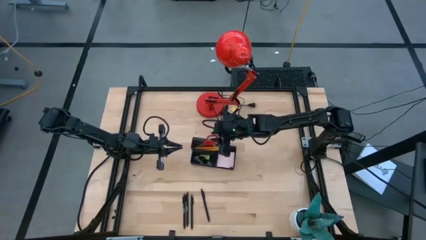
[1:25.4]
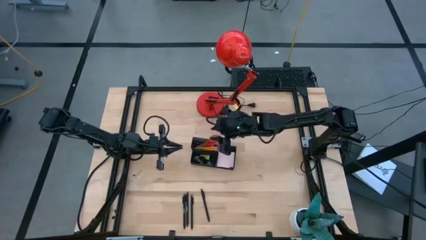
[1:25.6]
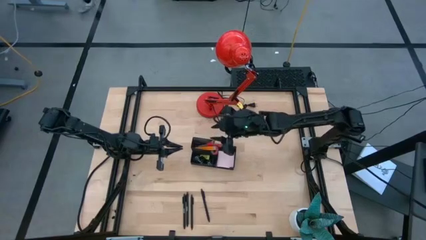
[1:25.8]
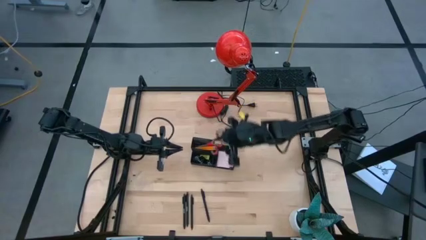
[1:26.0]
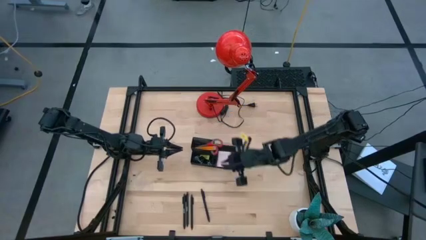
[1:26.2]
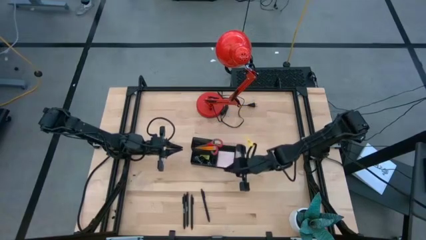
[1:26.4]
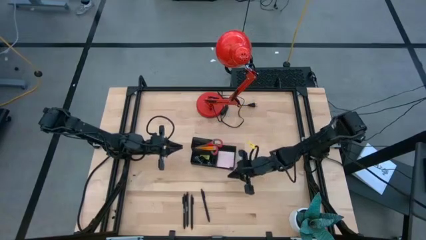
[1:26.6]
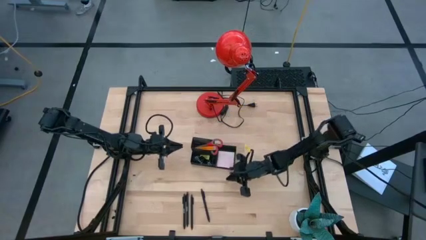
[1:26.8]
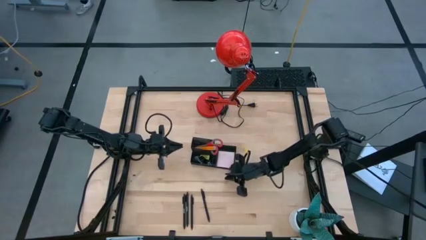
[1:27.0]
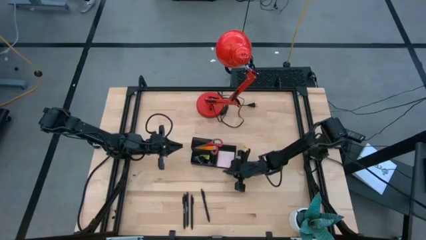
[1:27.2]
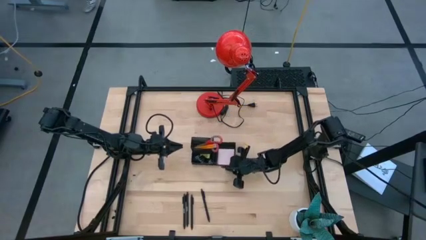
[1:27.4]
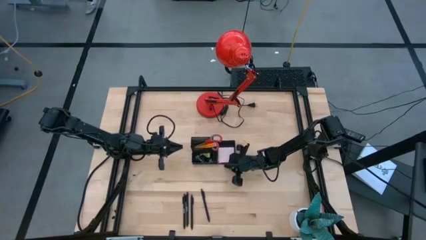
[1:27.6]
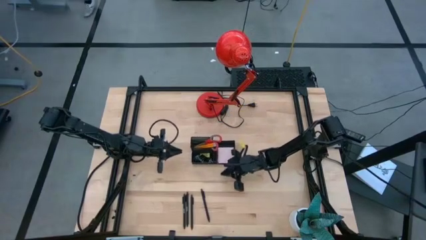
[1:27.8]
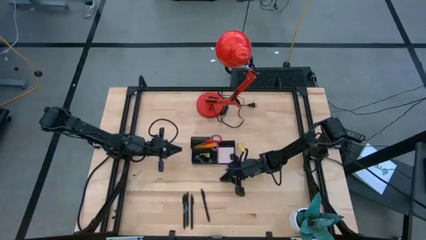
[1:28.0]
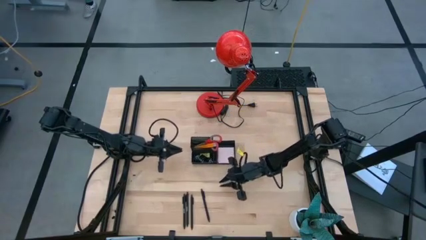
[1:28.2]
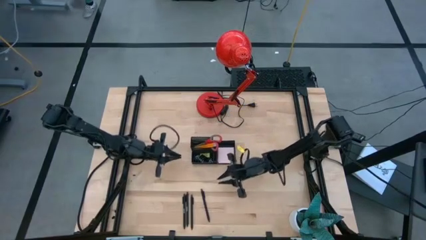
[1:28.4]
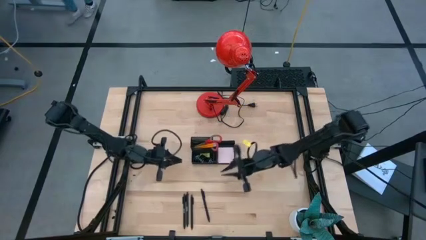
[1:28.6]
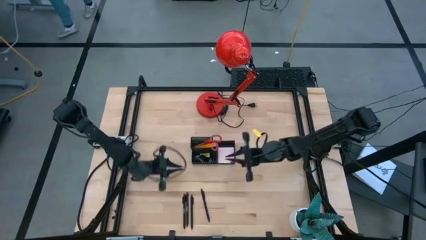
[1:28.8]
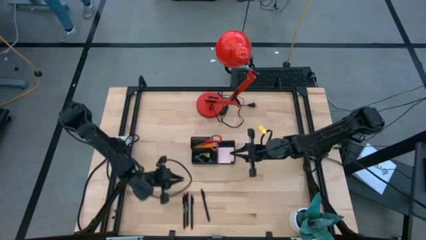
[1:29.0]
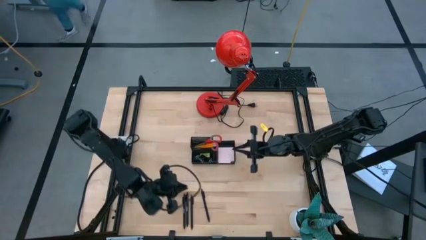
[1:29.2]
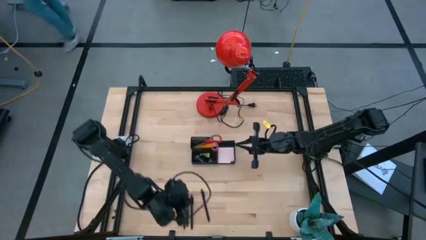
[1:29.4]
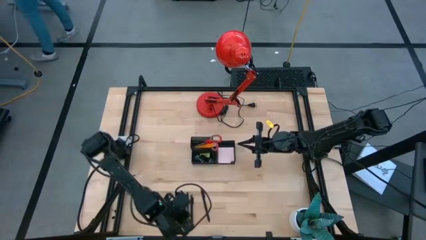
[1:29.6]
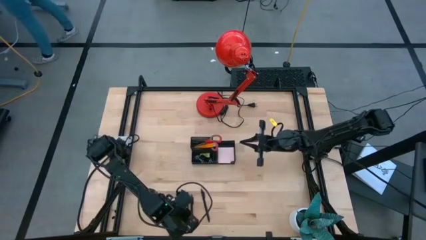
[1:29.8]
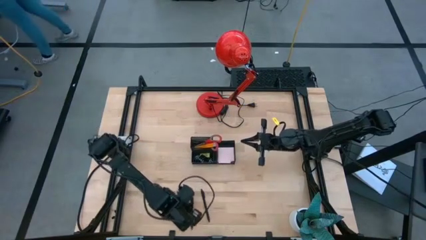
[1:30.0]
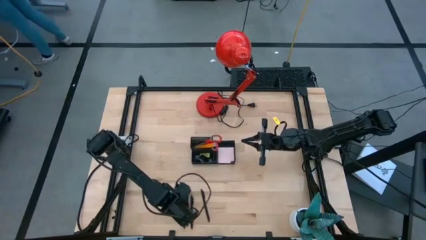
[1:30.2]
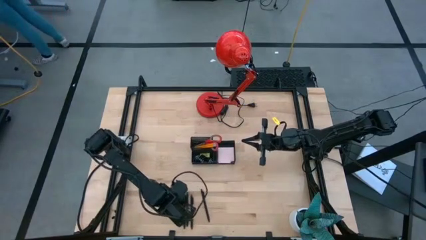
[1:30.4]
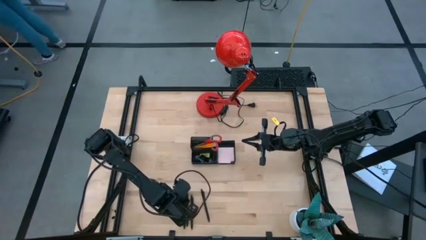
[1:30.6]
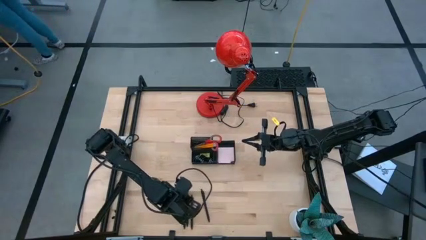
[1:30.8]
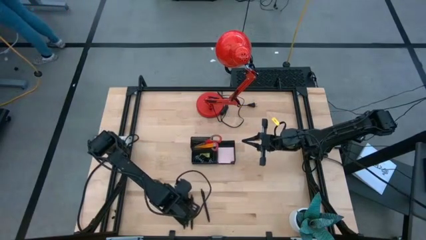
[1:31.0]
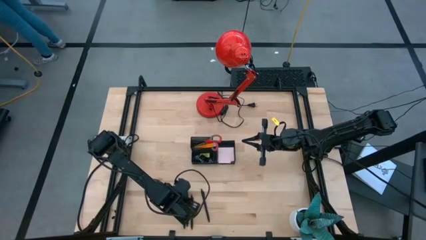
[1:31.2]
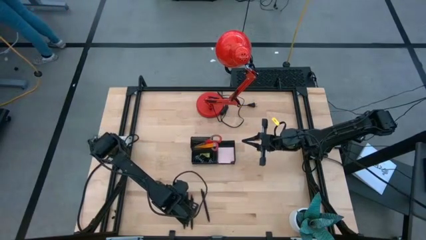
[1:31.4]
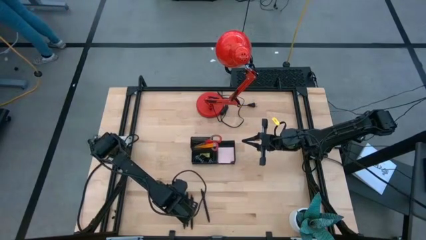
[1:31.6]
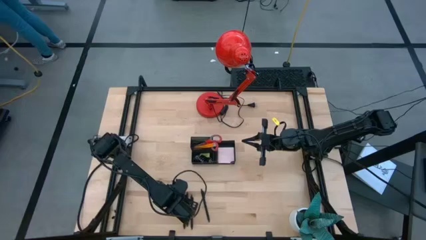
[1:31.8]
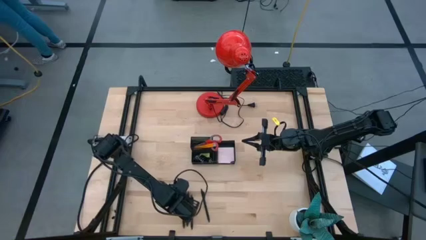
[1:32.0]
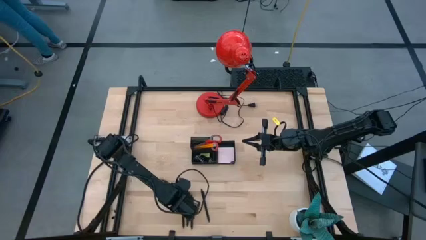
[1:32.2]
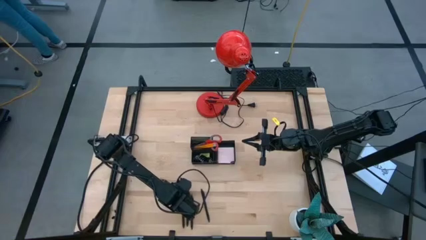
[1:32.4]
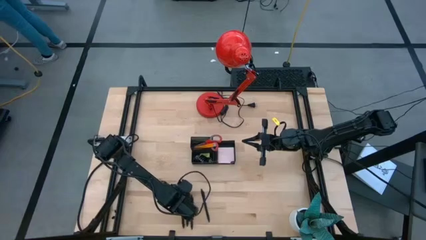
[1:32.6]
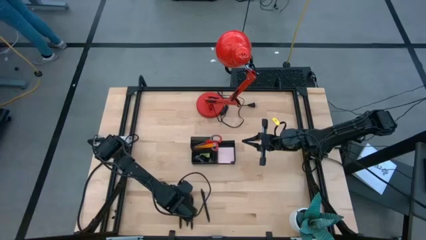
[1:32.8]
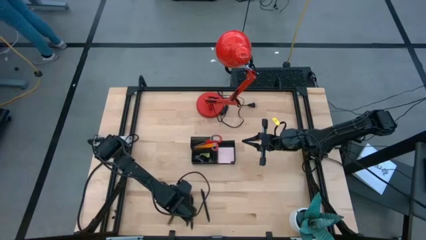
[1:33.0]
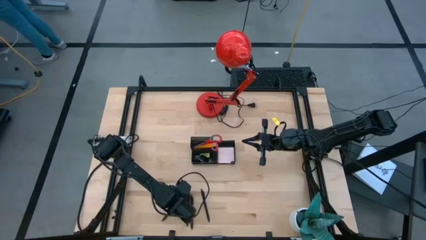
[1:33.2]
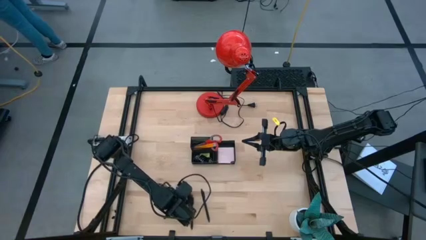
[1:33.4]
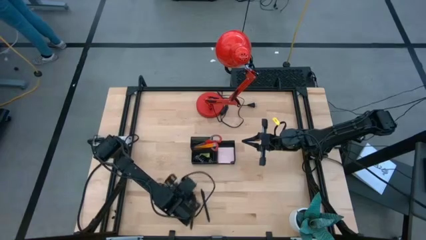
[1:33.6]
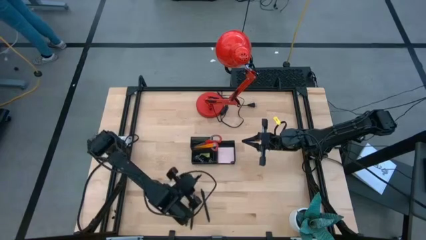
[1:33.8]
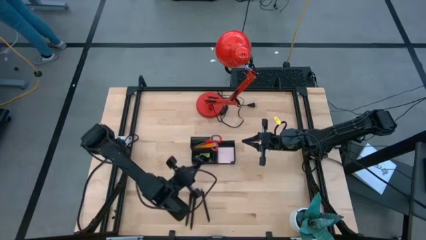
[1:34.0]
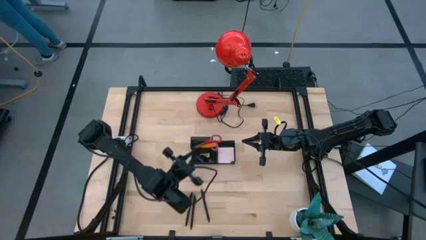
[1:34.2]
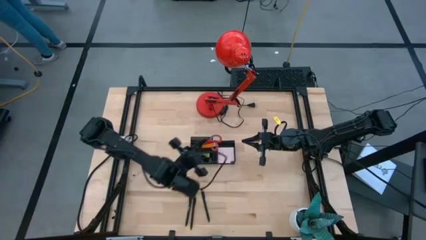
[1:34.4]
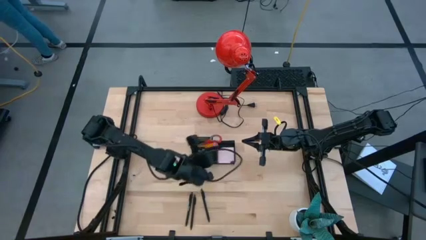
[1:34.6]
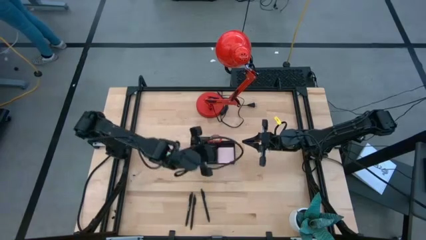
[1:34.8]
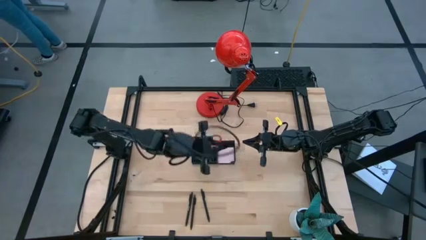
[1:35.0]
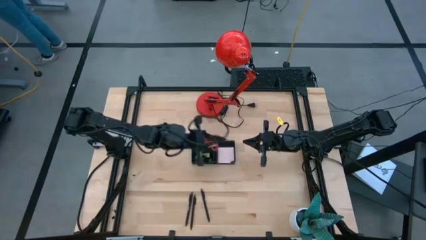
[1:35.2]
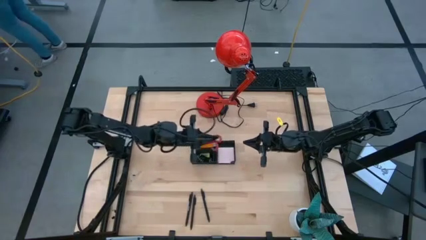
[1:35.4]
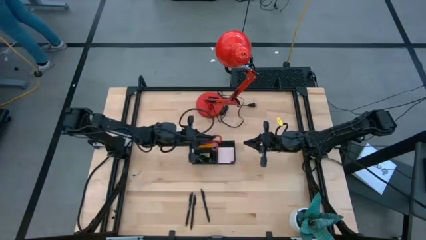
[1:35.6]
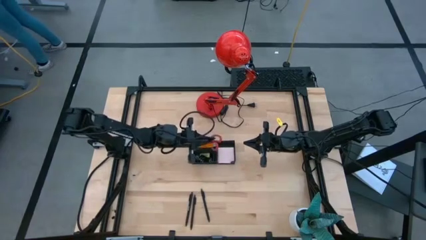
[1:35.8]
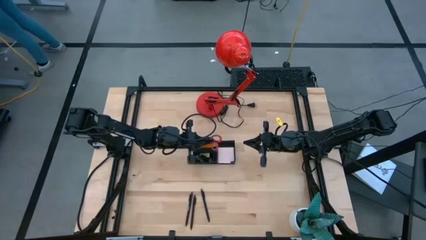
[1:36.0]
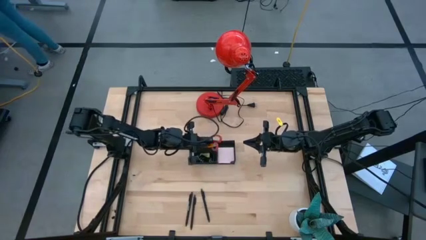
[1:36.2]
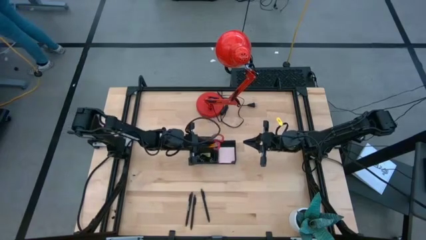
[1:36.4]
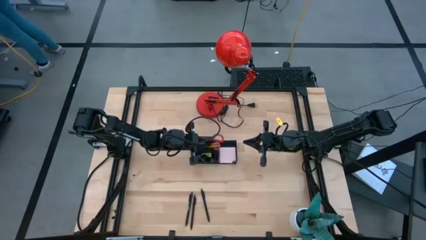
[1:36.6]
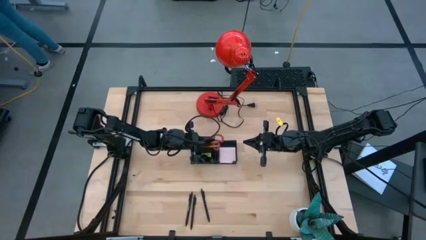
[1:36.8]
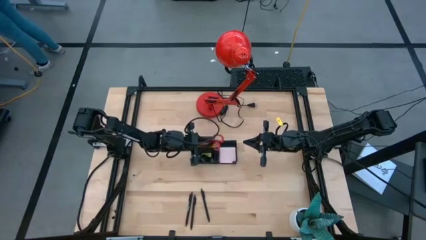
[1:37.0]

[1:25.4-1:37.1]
Task: Pick and place office supplies into organizer
Put the black pen into the black mesh desk organizer

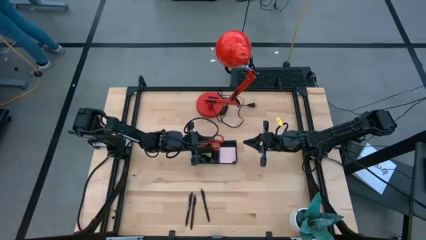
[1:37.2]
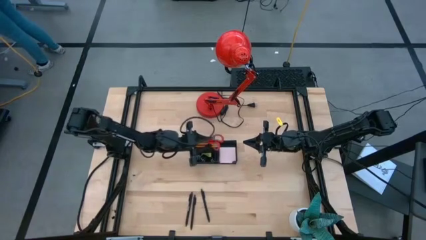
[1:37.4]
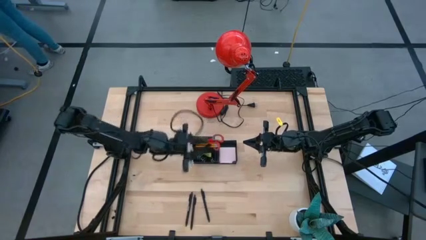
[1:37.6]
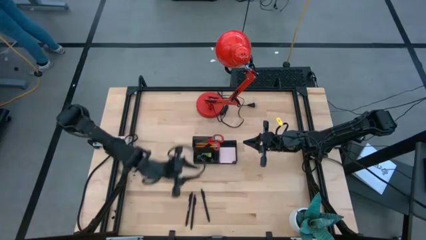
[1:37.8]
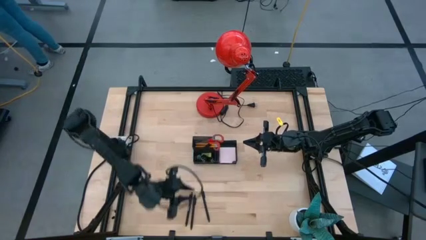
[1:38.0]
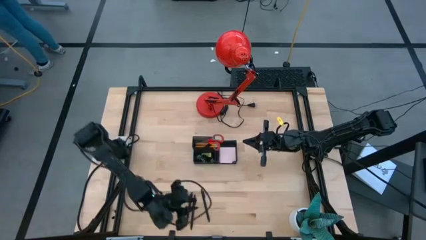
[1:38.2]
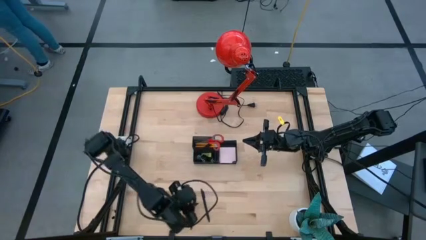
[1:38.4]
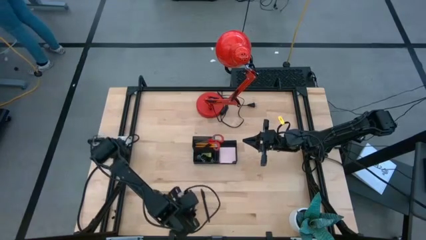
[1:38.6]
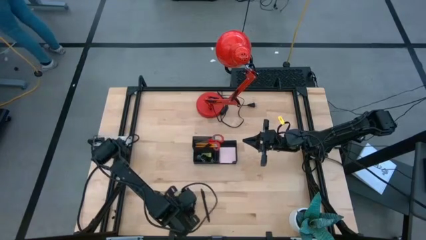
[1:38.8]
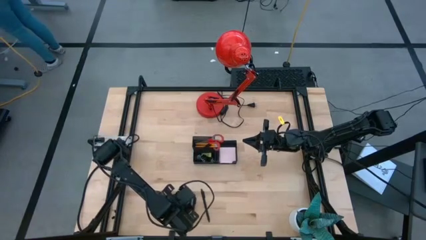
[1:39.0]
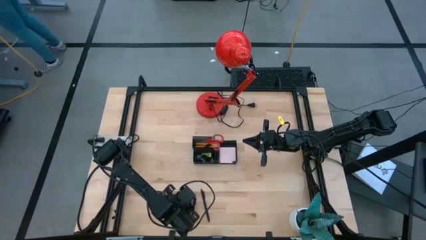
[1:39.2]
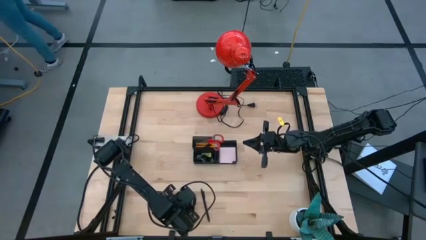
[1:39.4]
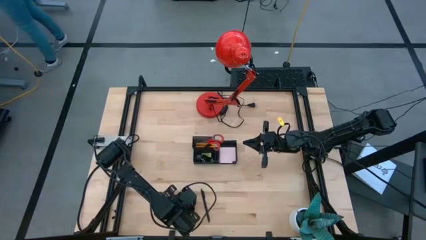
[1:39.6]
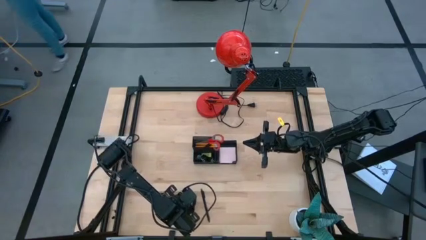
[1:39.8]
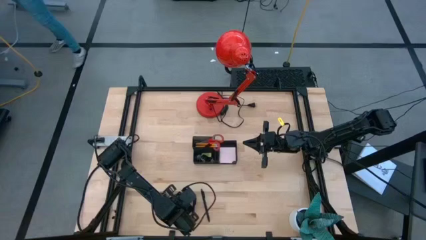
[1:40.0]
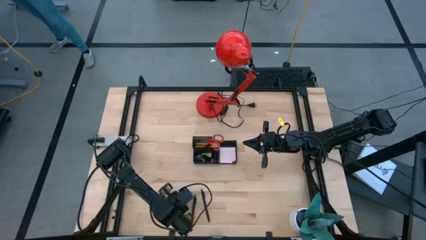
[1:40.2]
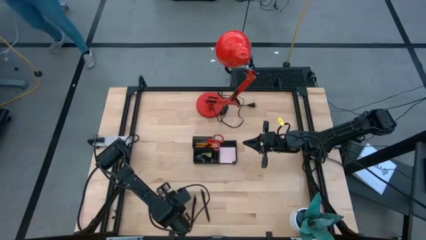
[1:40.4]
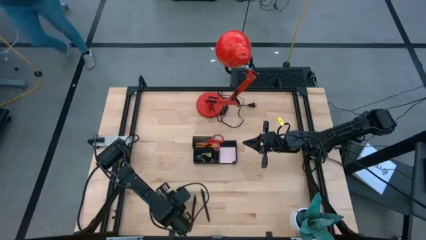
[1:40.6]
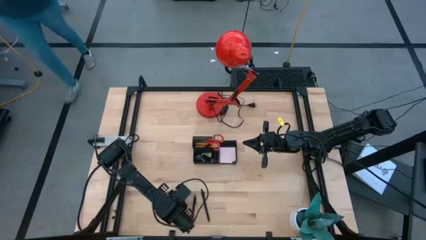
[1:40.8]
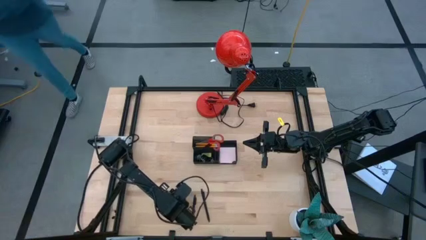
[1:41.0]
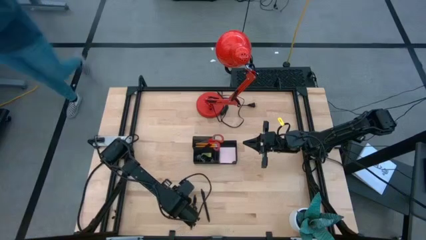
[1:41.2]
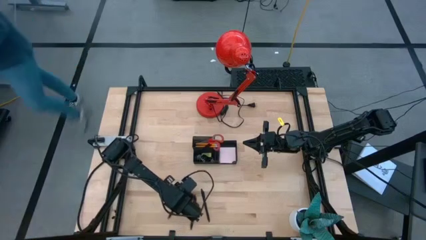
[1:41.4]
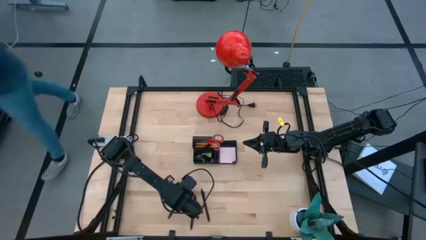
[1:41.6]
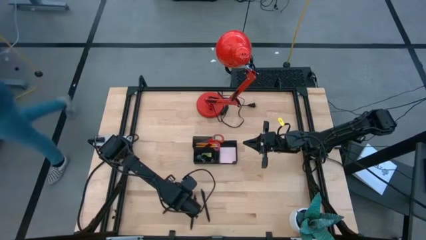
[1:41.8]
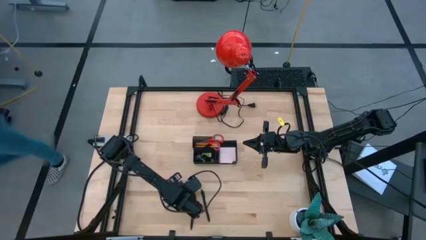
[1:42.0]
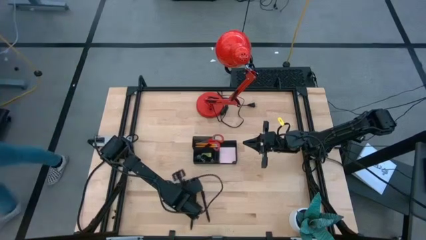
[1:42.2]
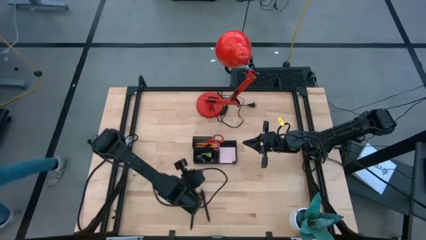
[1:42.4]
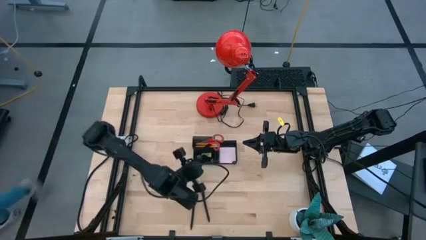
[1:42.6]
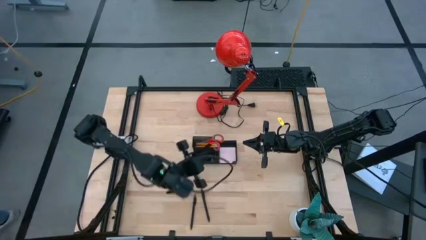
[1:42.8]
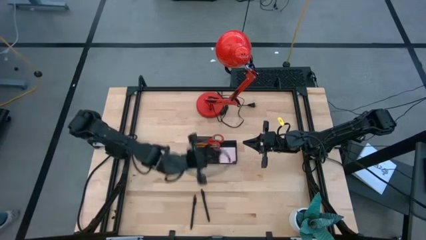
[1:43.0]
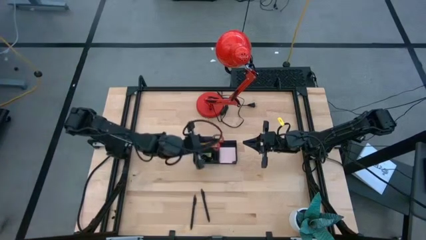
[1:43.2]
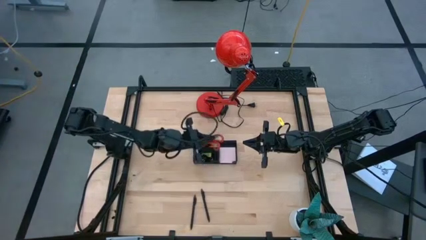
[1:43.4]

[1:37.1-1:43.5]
Put the black pen into the black mesh desk organizer
